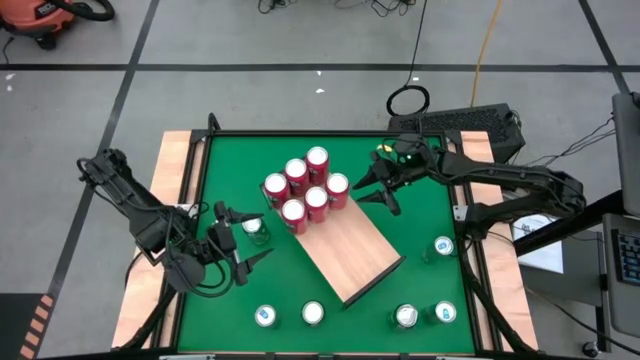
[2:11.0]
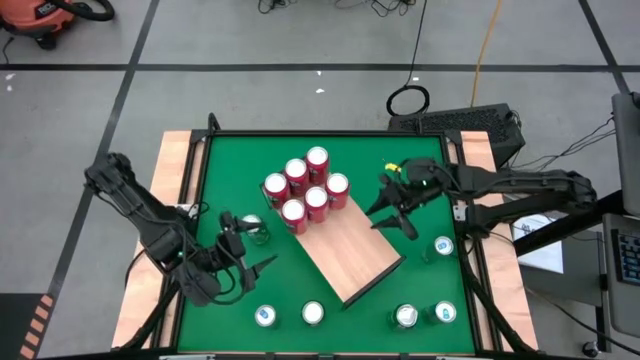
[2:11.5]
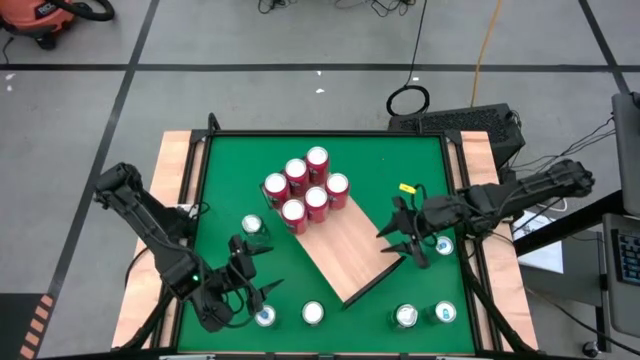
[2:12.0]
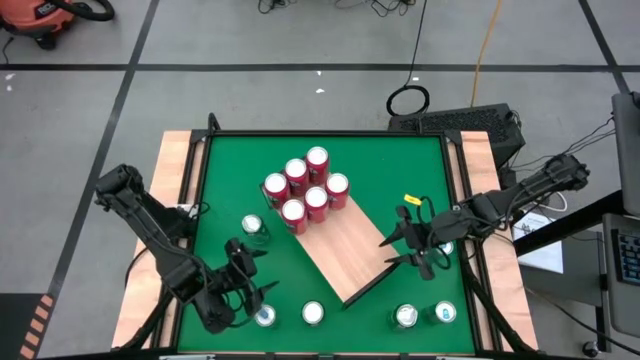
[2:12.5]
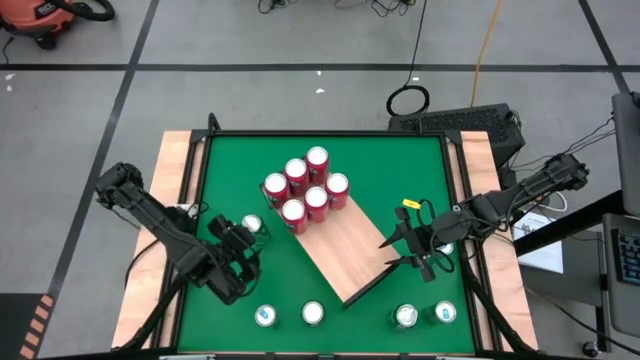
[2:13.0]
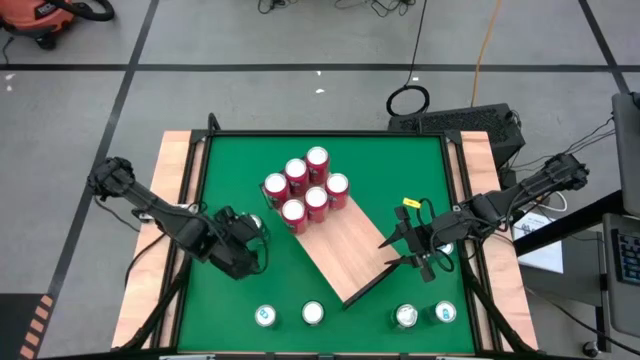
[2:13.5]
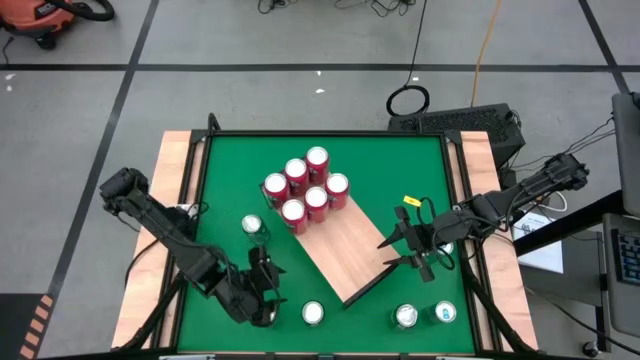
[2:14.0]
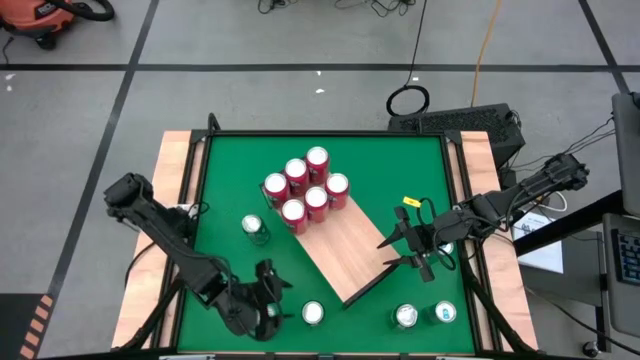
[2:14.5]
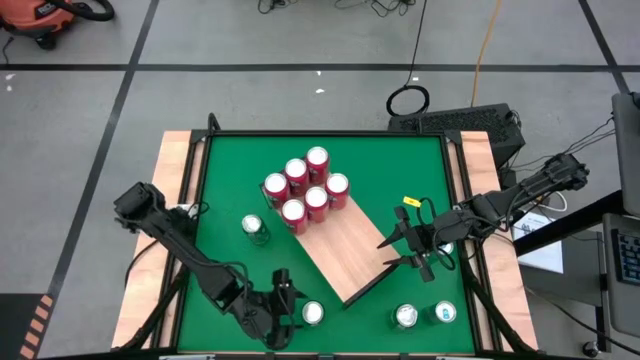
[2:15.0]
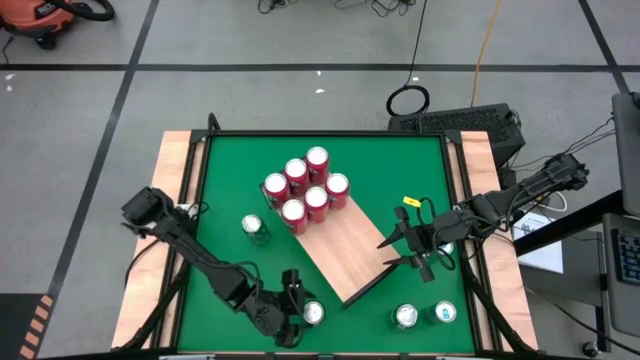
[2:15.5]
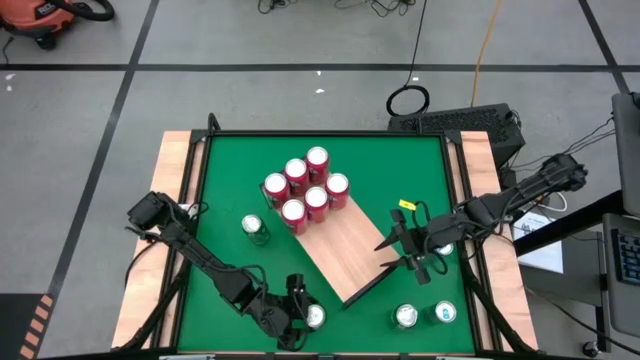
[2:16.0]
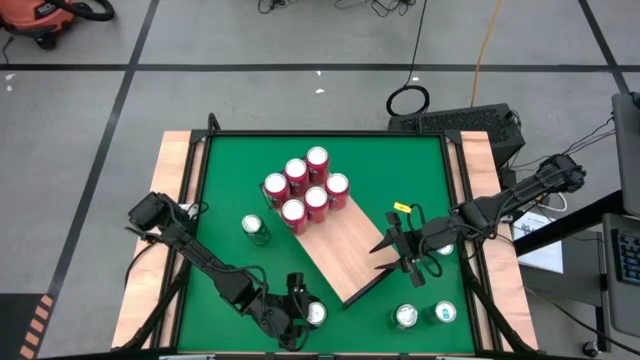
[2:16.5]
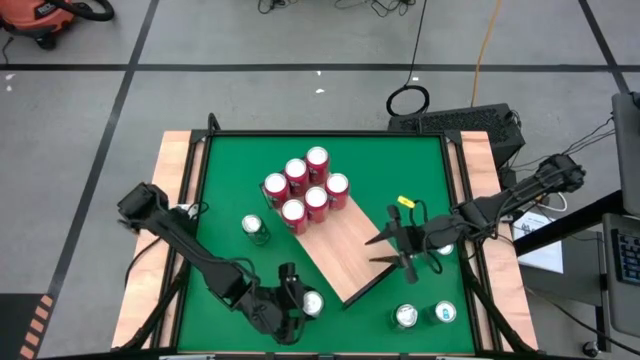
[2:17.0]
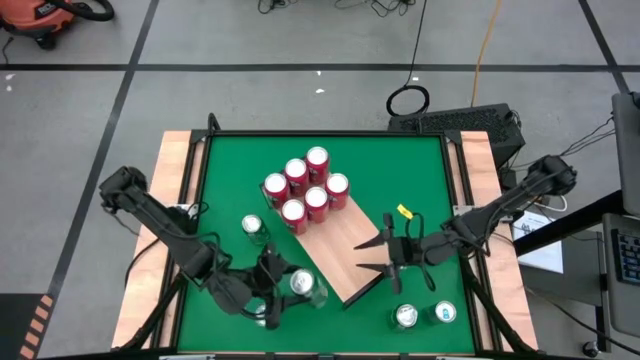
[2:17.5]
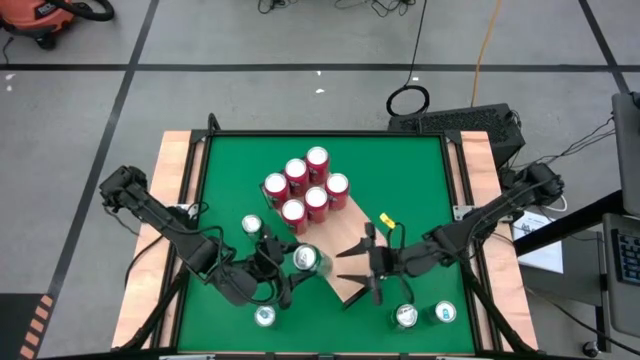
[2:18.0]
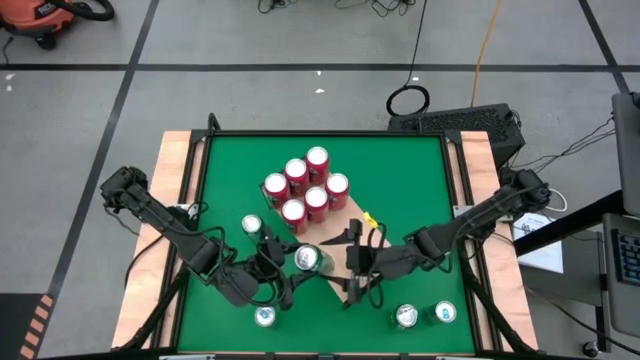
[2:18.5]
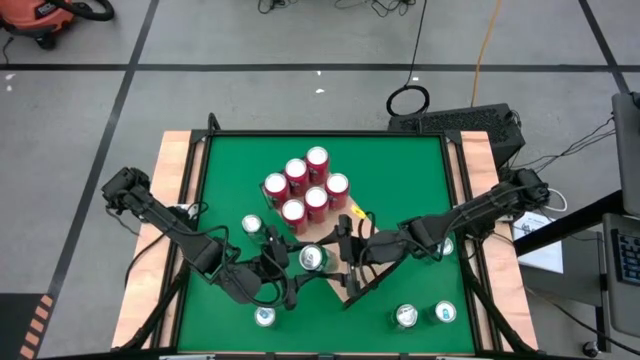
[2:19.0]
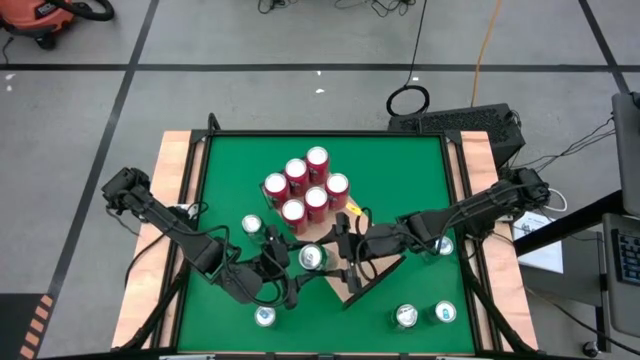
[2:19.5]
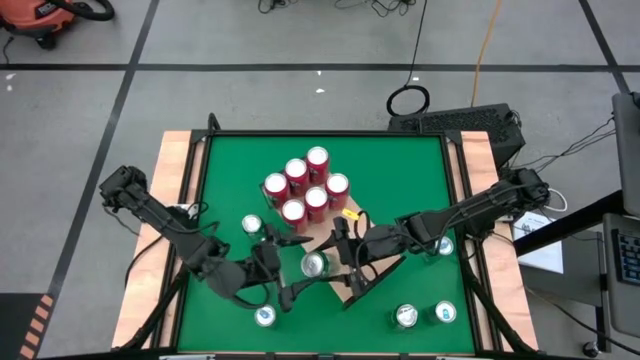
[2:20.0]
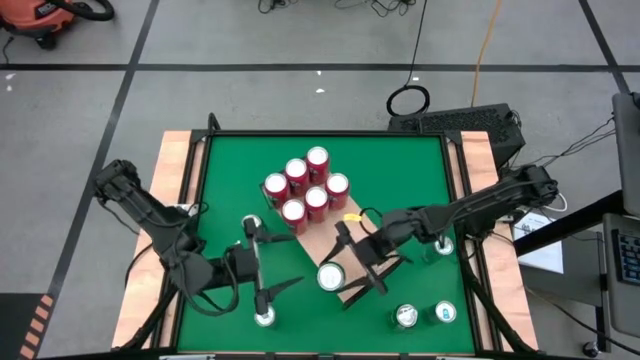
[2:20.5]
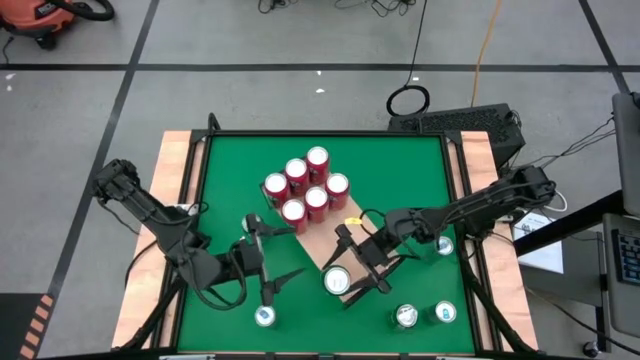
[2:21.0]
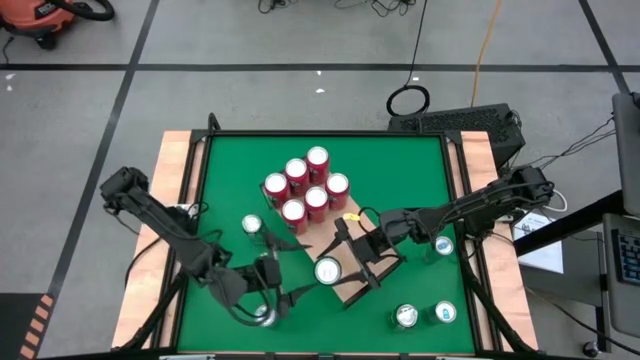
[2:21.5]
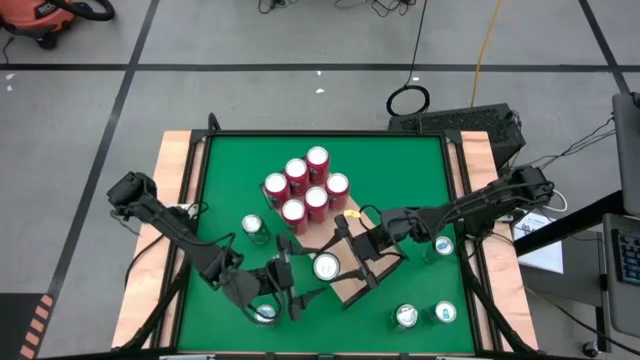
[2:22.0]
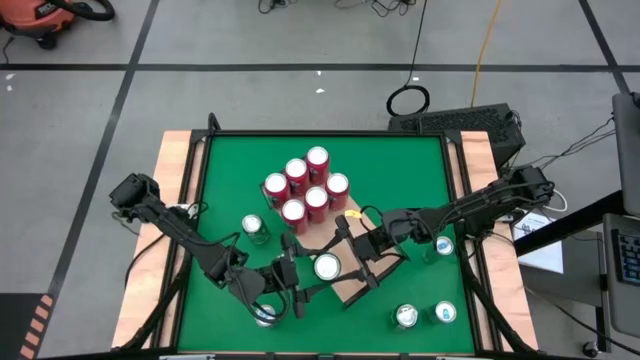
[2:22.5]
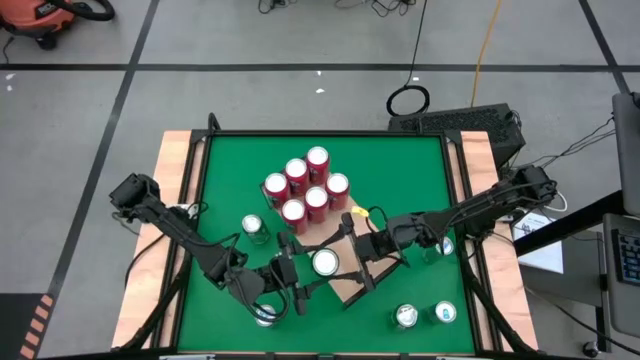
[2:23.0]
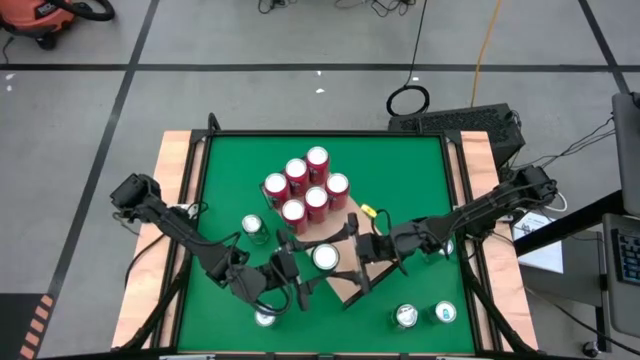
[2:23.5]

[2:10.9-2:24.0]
Task: Place canned beverage on shelf
Put the green soda can on the shelf

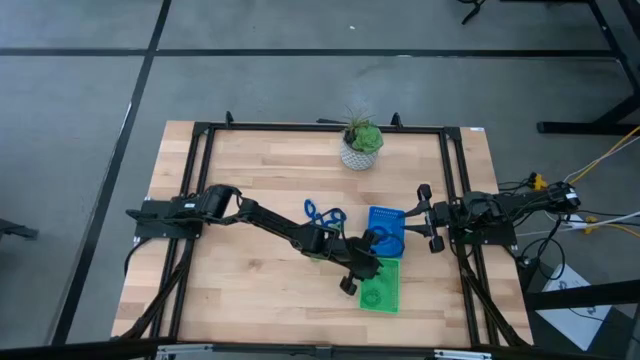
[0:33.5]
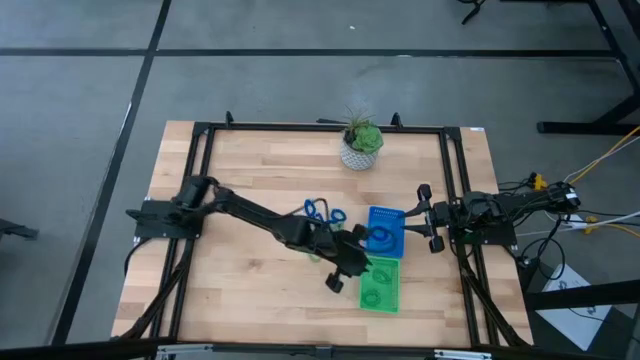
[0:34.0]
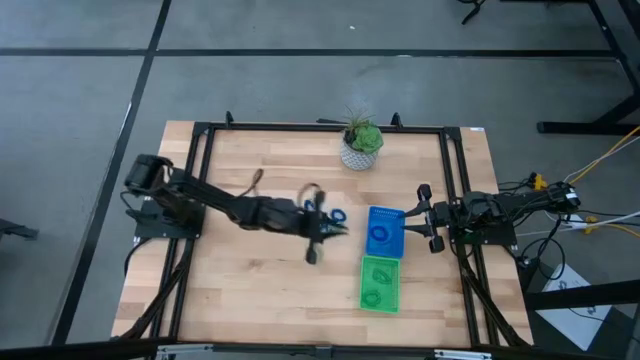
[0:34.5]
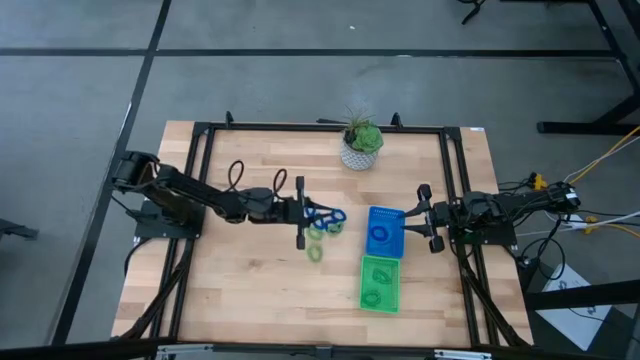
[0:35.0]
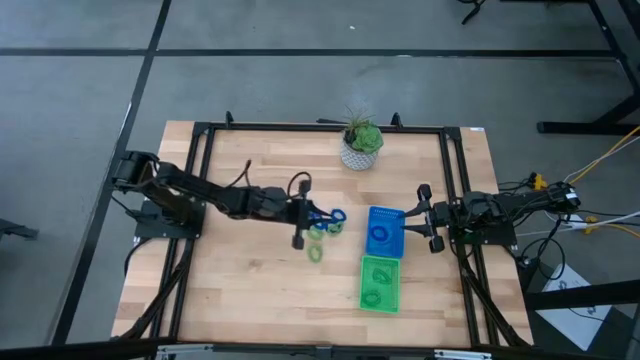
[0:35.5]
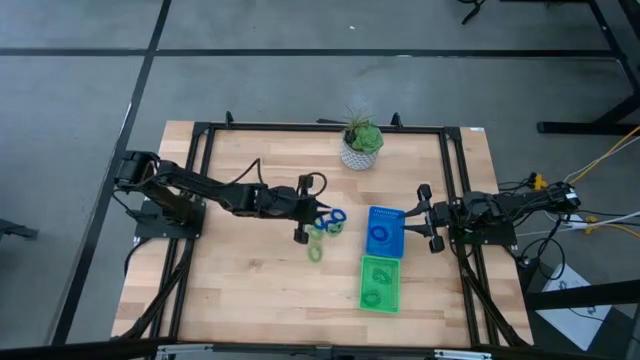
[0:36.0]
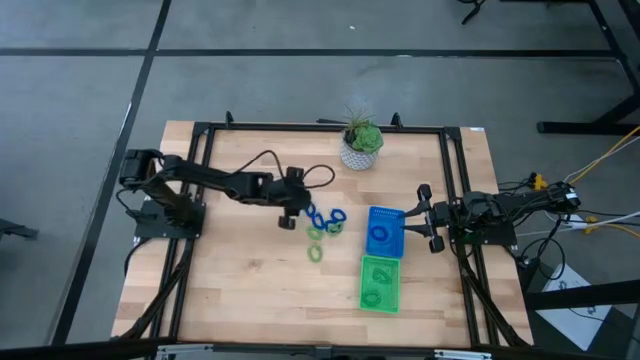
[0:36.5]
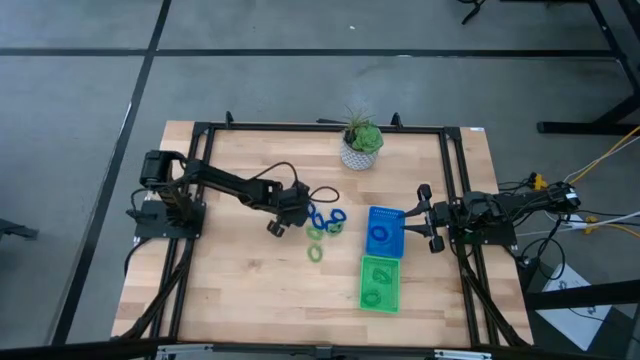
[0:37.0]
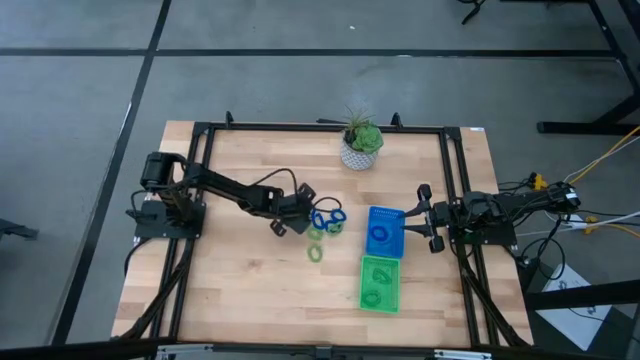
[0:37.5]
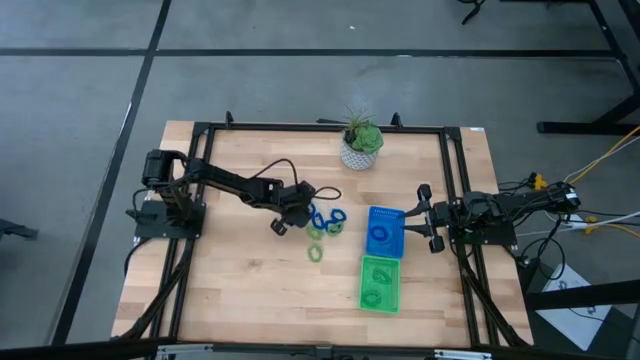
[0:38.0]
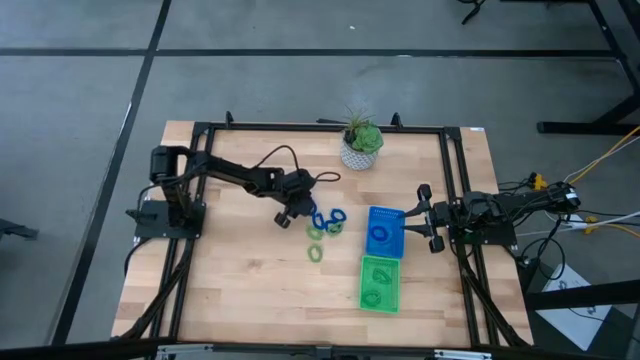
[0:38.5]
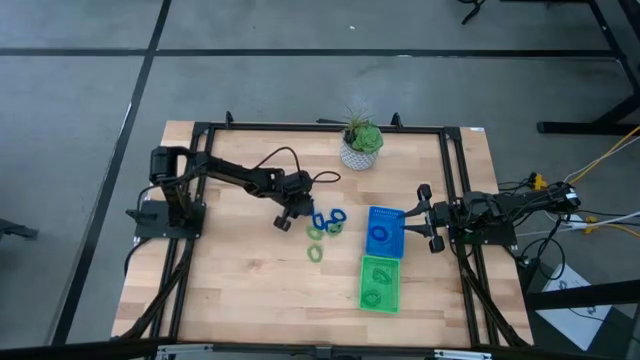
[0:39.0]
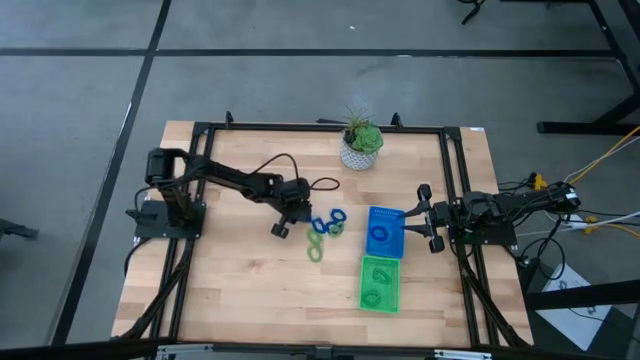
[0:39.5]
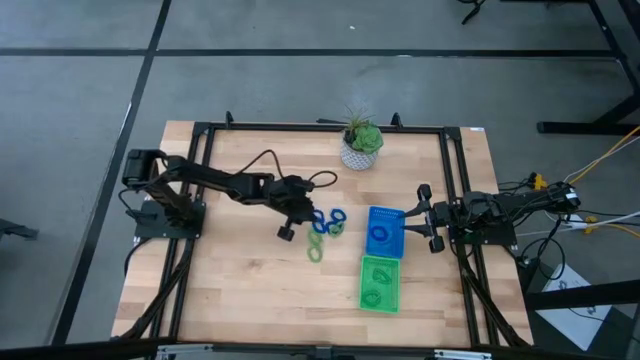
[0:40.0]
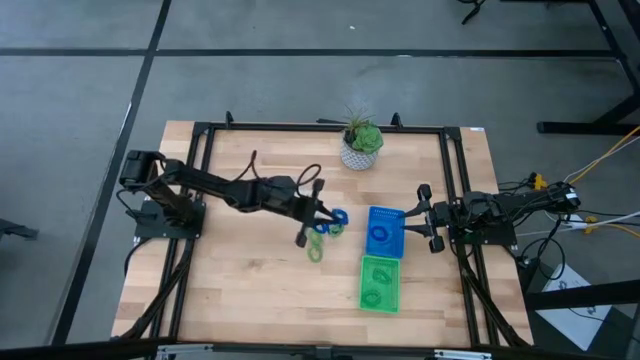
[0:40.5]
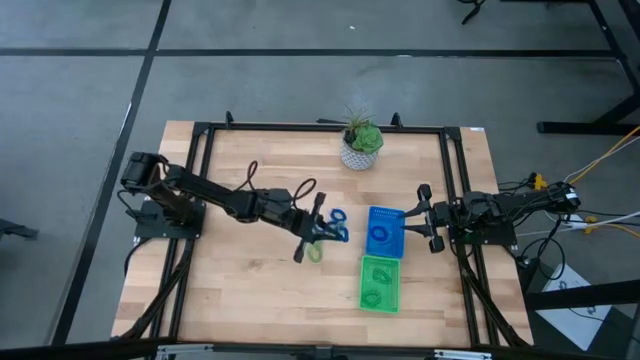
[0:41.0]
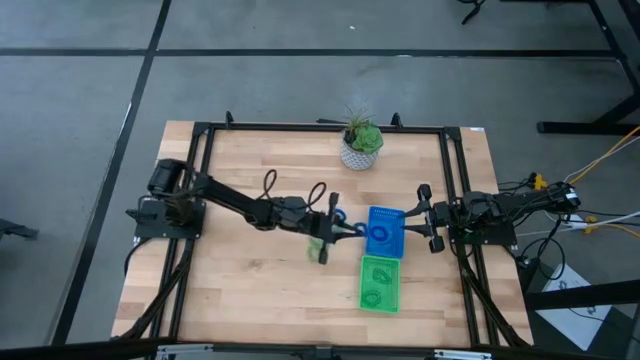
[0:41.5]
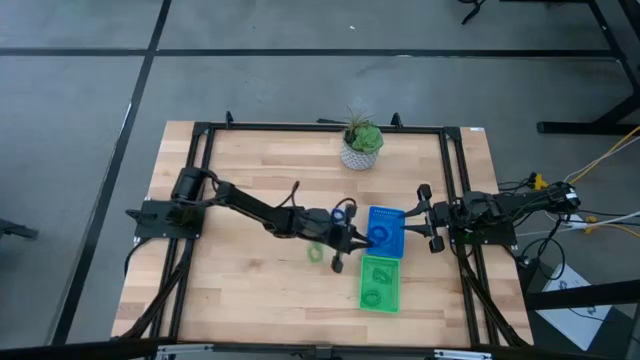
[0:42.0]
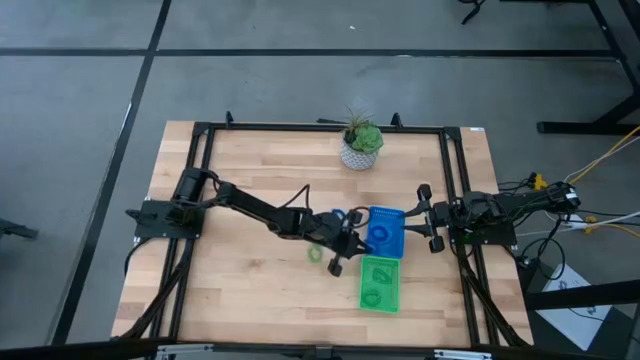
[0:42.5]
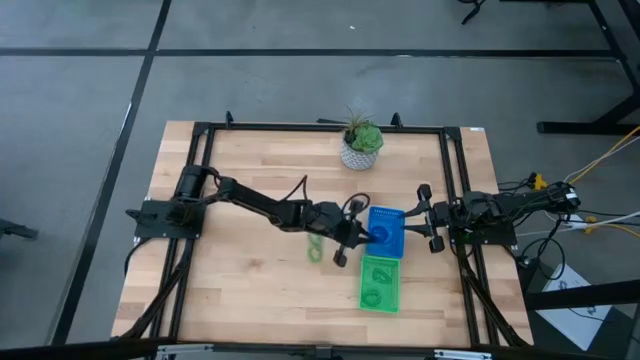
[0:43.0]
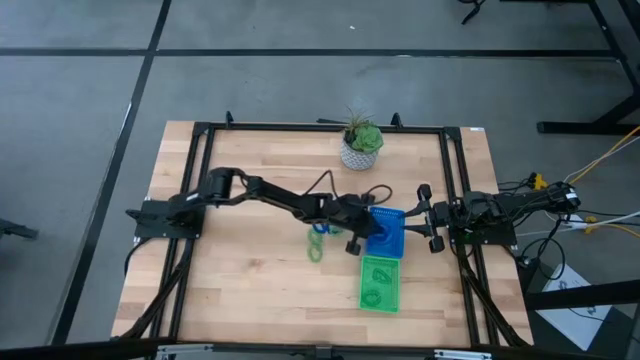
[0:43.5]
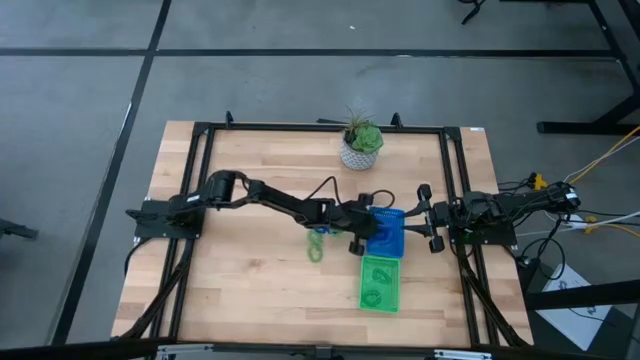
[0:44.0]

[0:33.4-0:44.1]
Task: Sort spring keychains
Put the blue spring keychain into the blue bin
